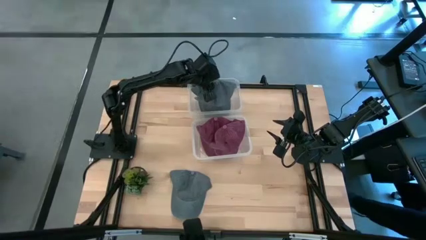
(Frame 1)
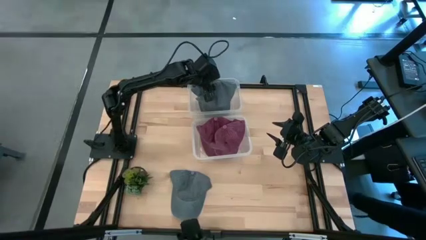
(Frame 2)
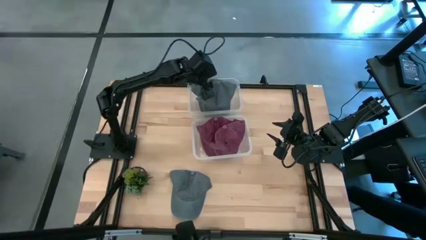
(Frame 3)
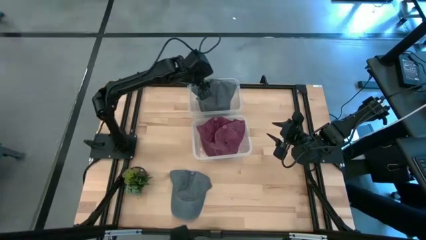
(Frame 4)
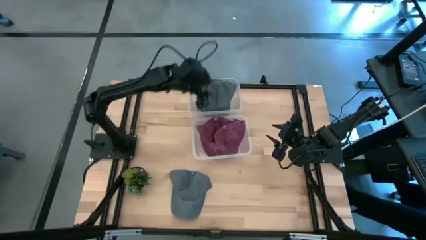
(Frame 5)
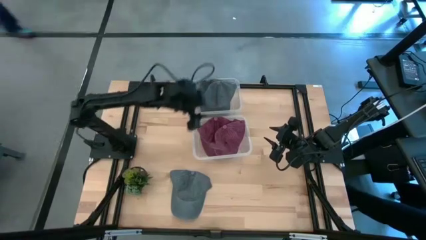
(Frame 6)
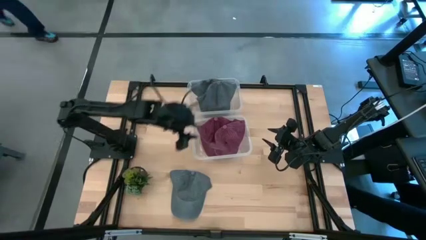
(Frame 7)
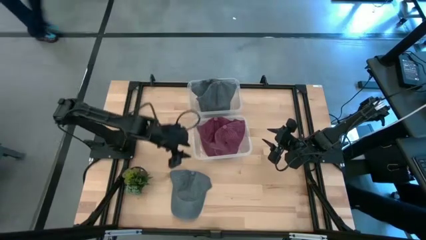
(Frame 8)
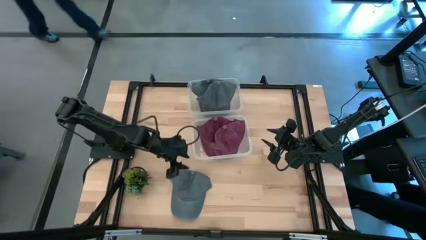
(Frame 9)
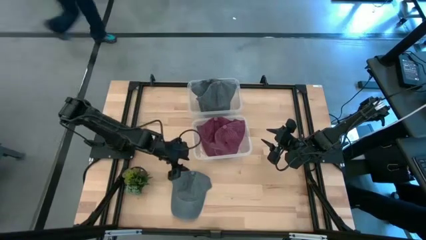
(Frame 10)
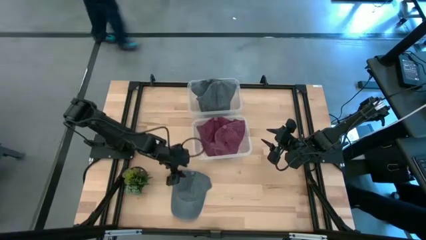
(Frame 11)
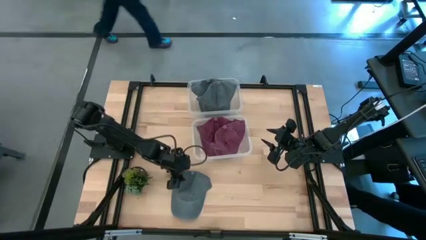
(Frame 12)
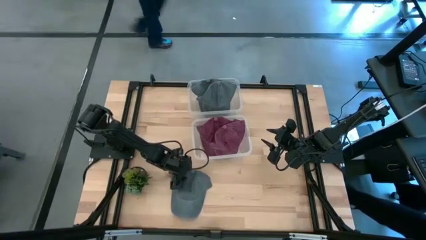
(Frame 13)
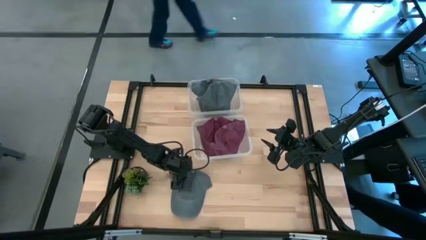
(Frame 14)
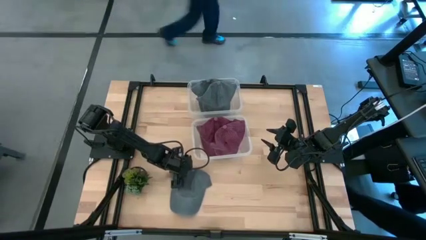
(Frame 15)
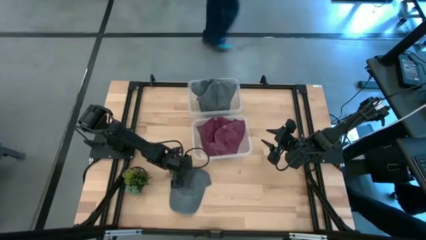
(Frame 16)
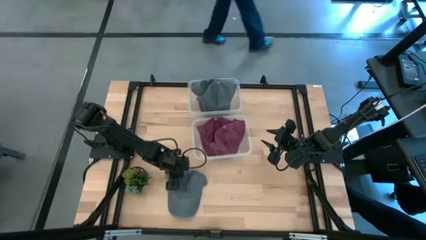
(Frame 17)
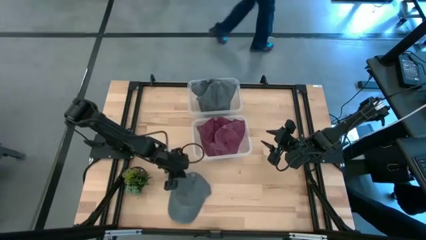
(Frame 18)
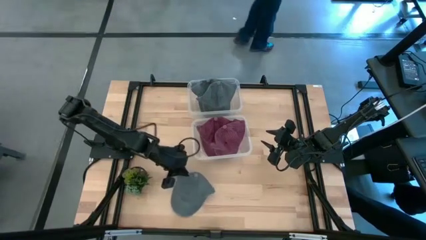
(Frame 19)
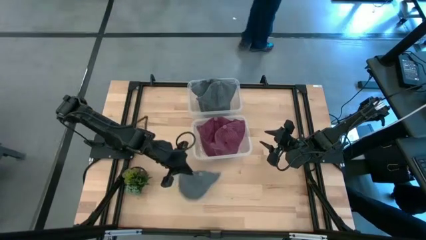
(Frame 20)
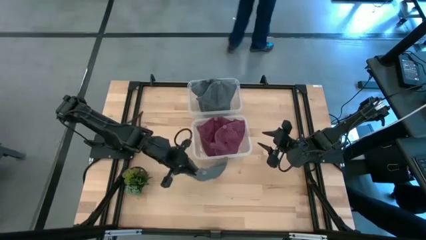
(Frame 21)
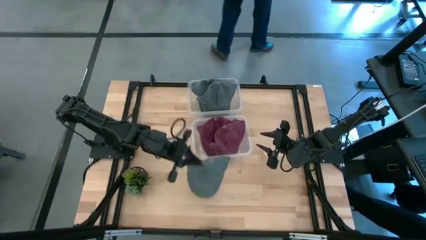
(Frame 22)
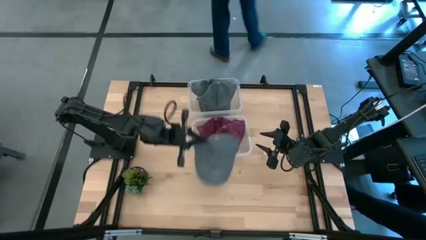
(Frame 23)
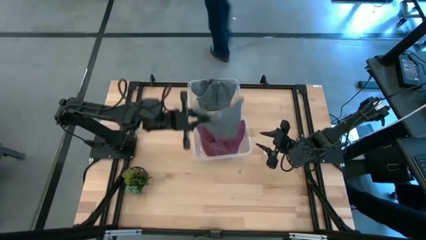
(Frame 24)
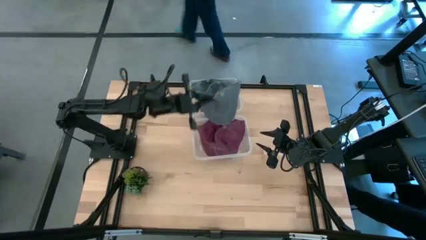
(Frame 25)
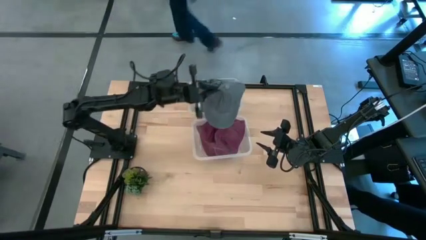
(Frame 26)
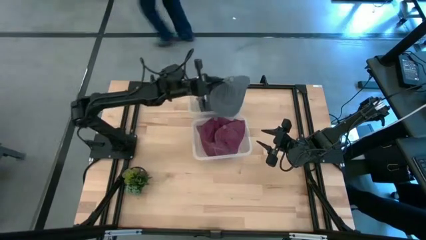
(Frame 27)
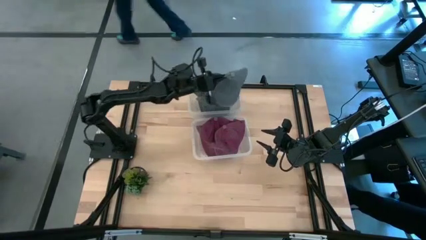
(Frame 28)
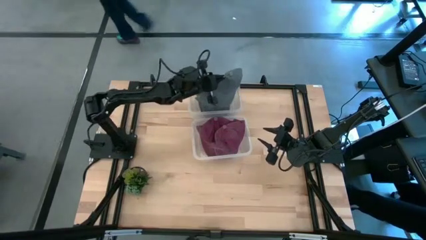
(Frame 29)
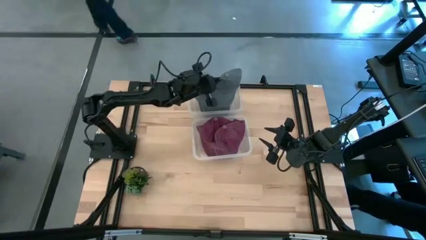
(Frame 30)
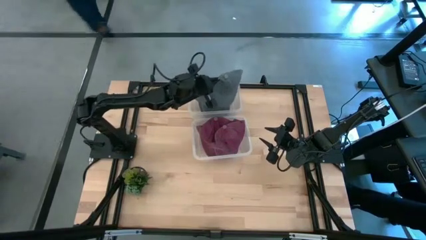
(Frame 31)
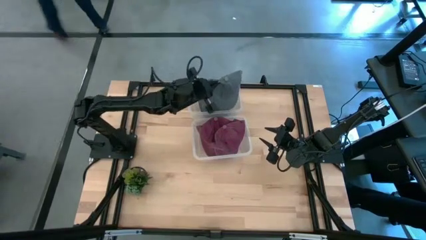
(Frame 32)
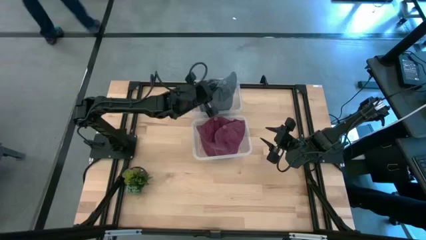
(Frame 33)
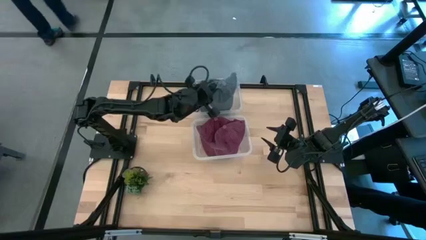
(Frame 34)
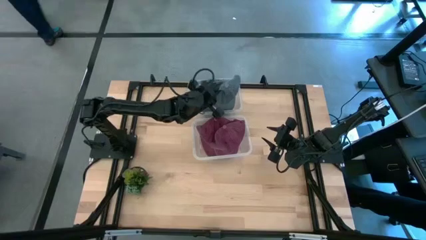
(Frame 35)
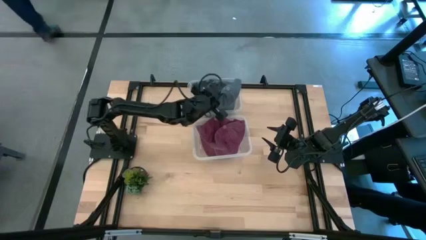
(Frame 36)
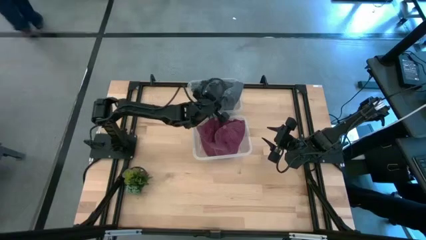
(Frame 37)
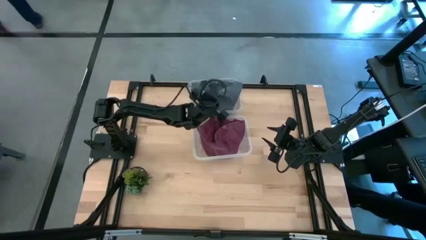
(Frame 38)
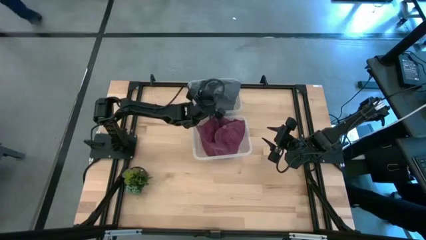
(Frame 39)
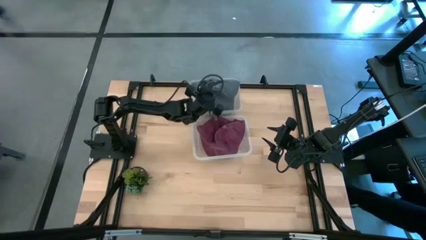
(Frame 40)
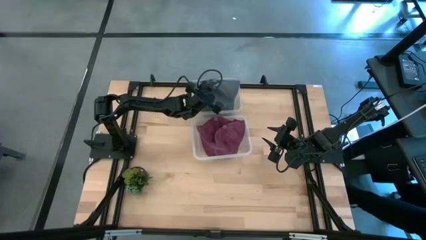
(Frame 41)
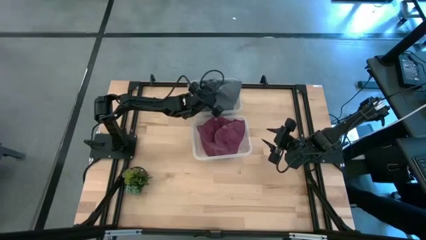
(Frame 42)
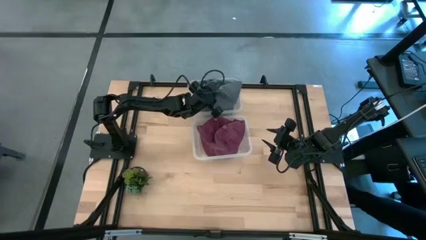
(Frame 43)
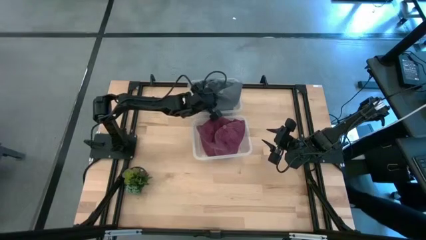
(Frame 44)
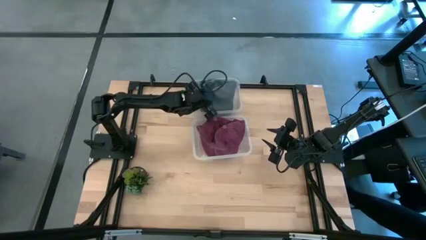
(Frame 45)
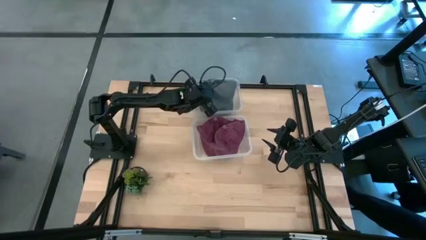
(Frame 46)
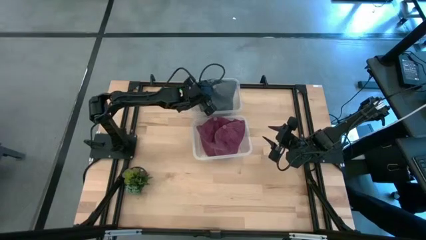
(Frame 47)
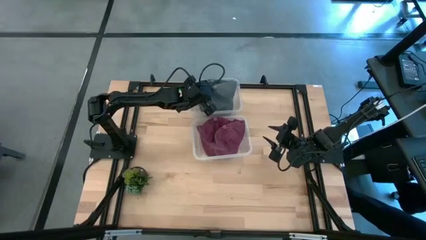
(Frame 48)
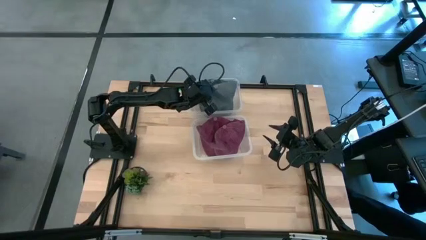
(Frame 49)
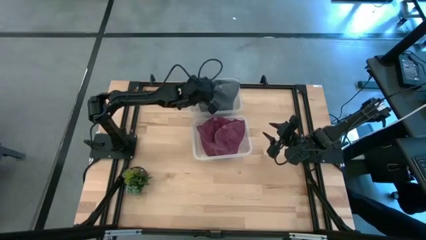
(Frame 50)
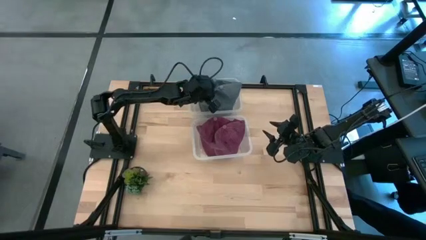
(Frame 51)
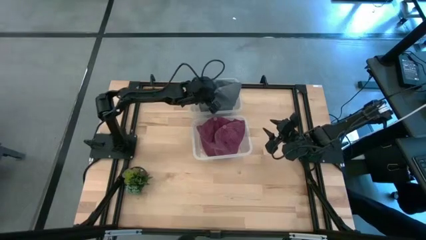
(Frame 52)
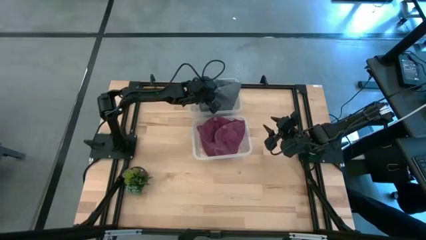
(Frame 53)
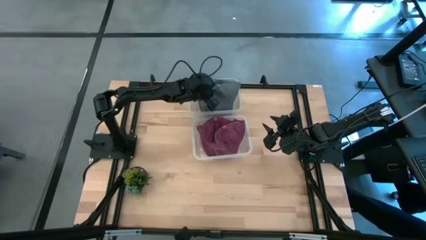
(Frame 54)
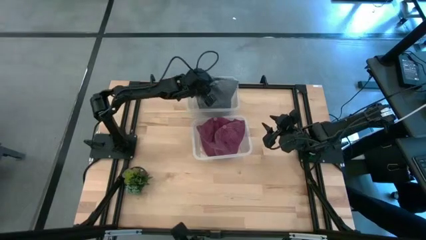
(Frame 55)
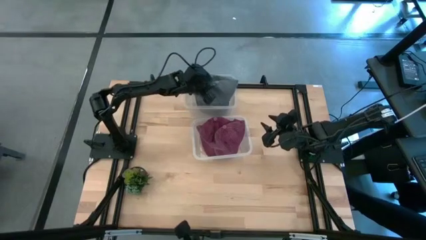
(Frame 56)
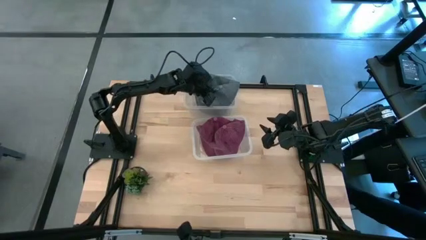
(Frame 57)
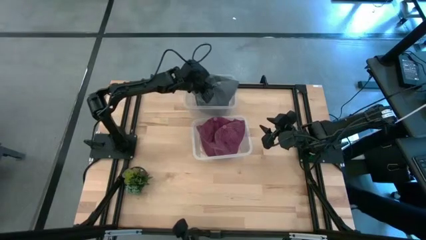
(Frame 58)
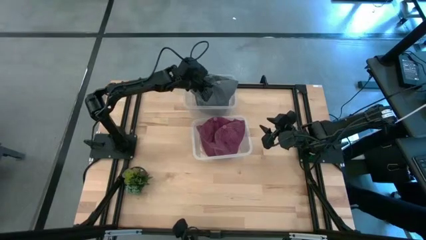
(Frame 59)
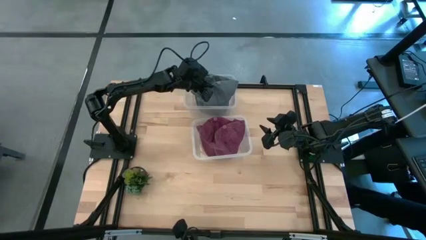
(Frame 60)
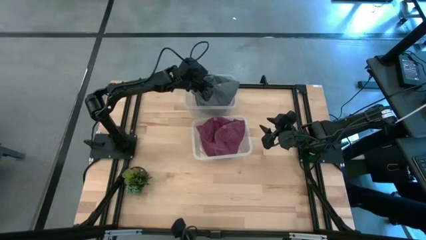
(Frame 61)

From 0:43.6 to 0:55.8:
Task: Pick & Place hat
Put the gray cap into the top transparent bin

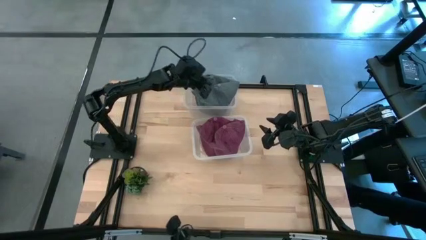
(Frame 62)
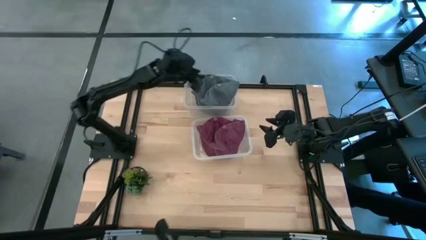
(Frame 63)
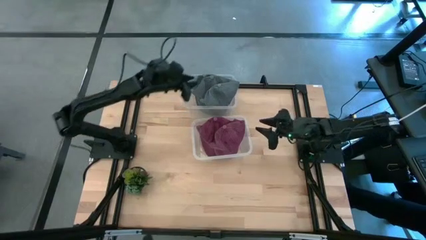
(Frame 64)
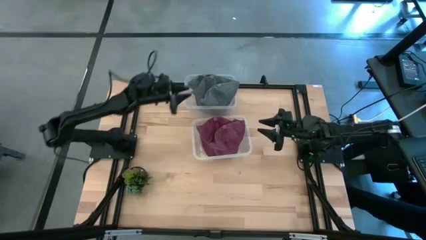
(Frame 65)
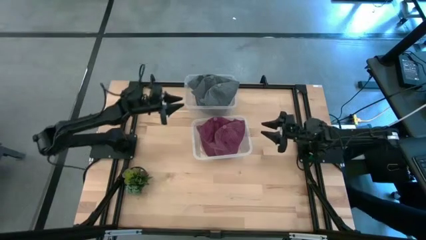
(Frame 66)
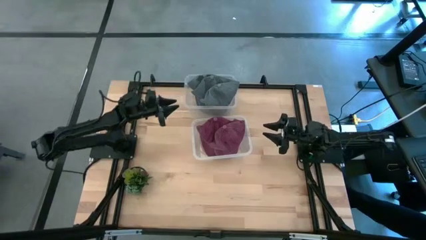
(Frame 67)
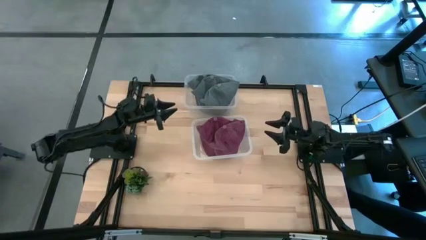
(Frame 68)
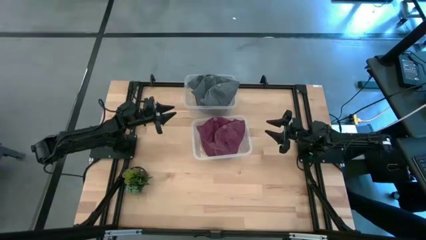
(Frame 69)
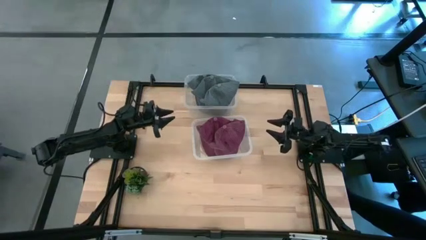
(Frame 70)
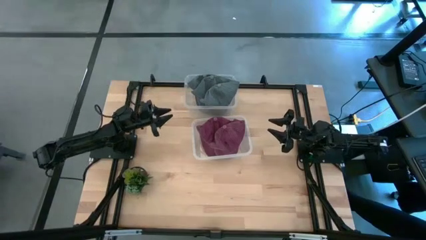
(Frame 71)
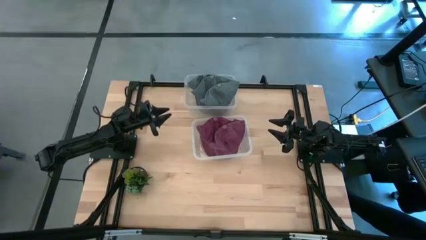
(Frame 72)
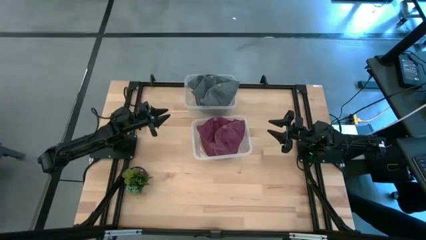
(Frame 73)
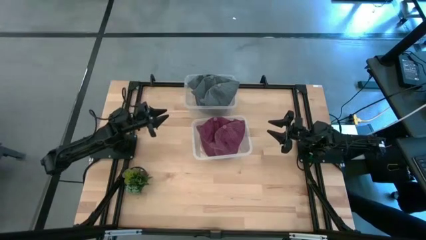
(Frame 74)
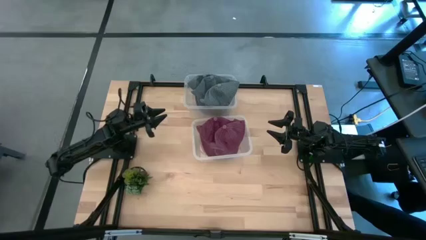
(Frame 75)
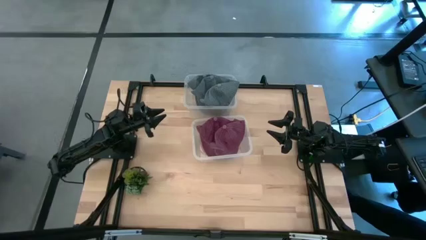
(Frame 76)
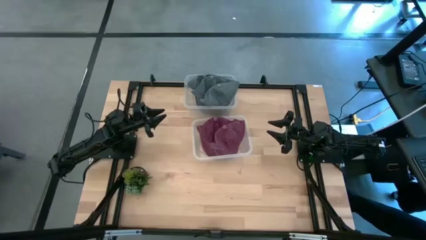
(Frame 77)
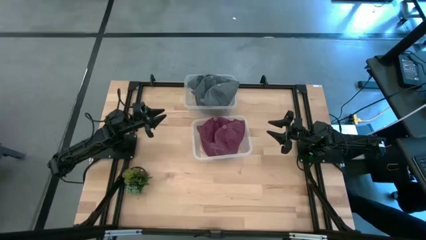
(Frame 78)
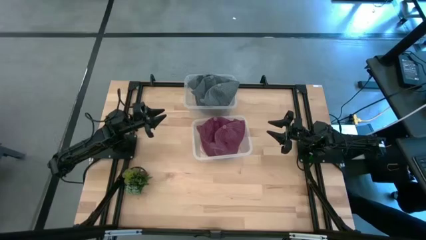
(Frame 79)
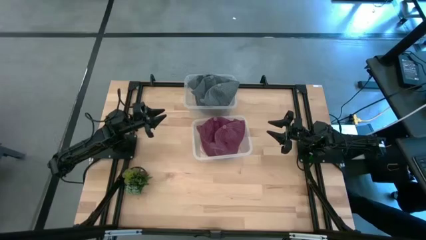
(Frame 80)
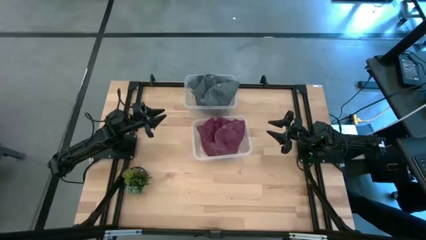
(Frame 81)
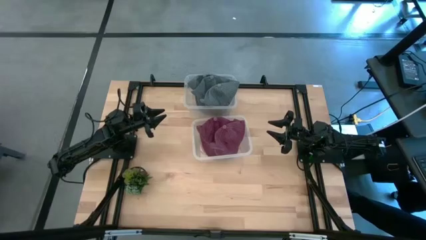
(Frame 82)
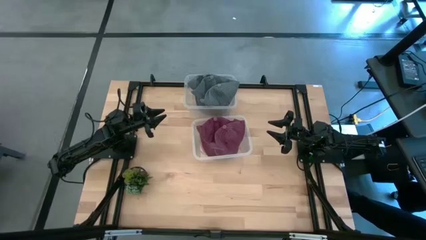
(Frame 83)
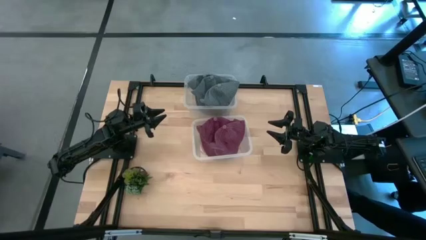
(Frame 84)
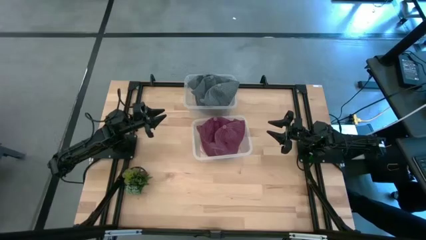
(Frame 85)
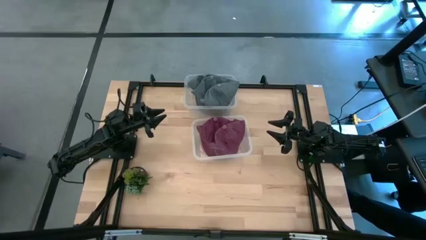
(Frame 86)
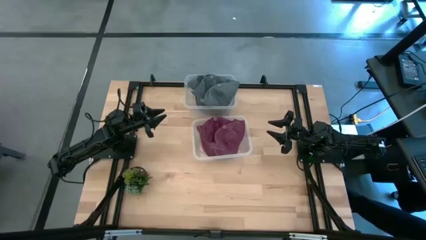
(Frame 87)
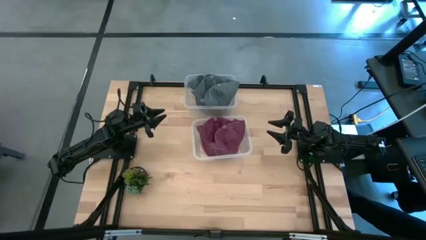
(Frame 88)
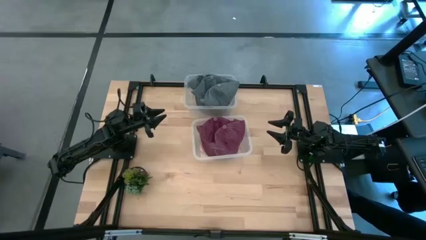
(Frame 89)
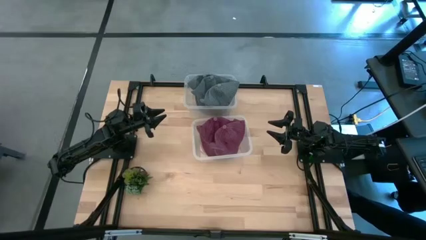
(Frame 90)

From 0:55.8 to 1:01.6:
Return to Home Position
